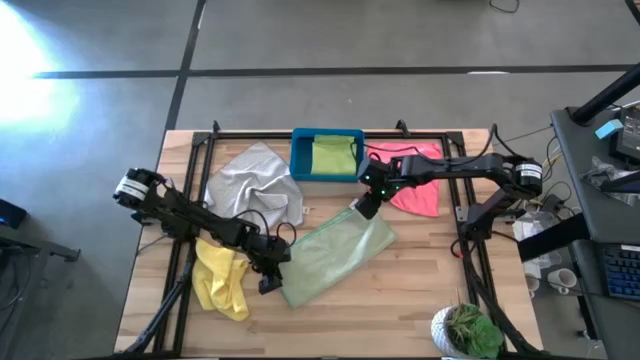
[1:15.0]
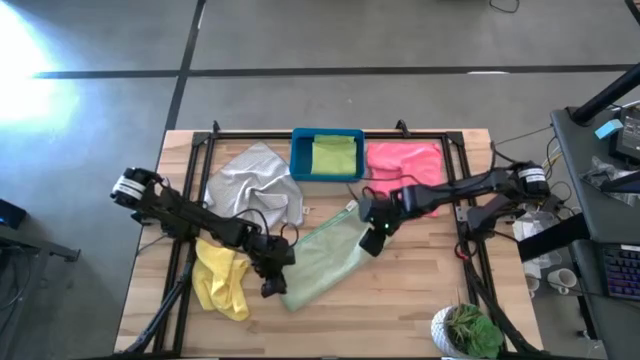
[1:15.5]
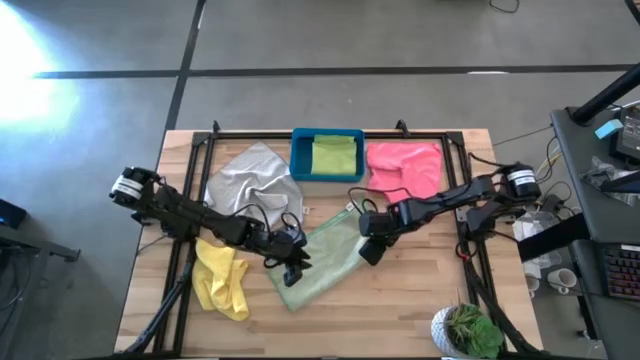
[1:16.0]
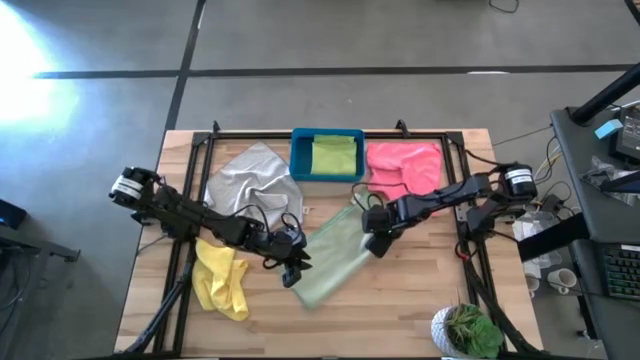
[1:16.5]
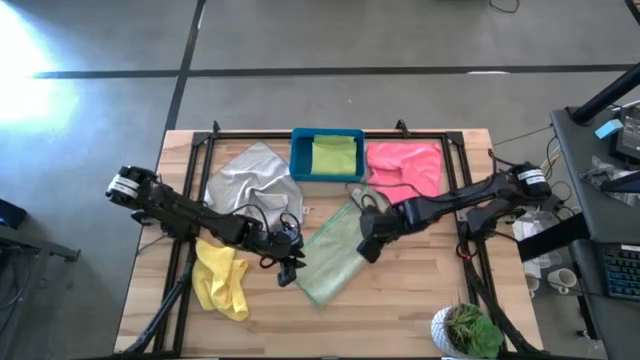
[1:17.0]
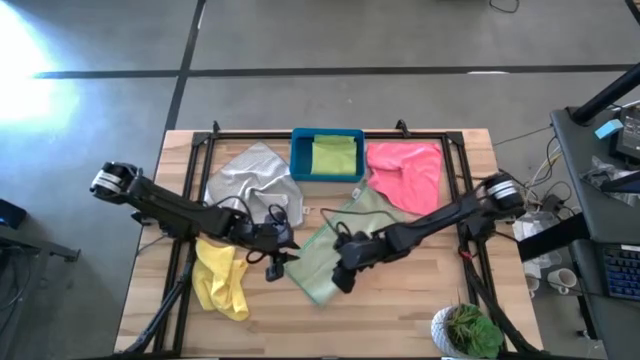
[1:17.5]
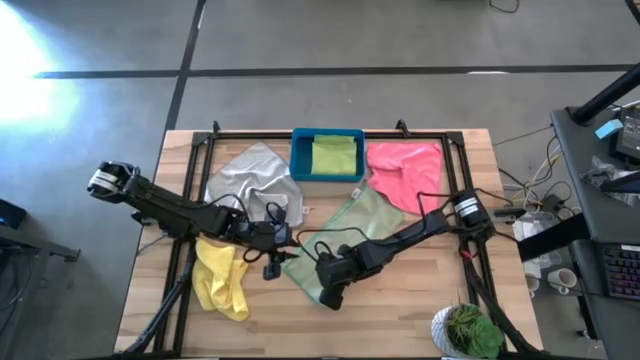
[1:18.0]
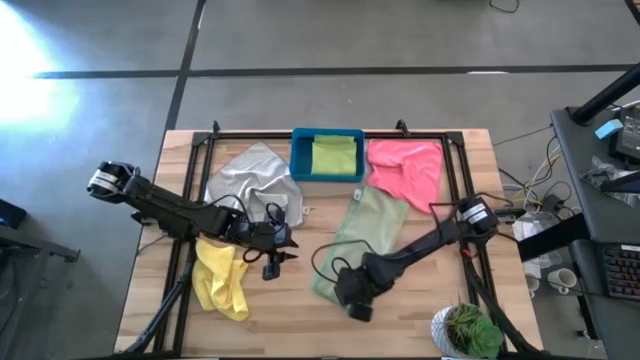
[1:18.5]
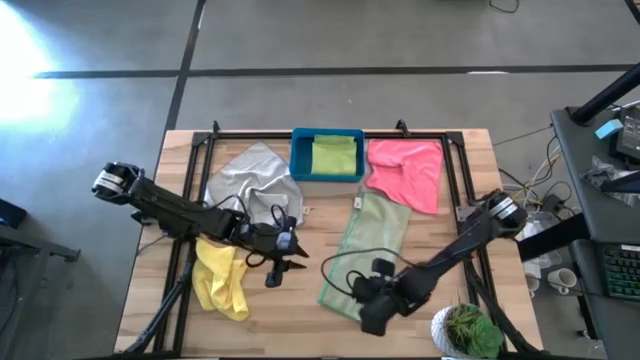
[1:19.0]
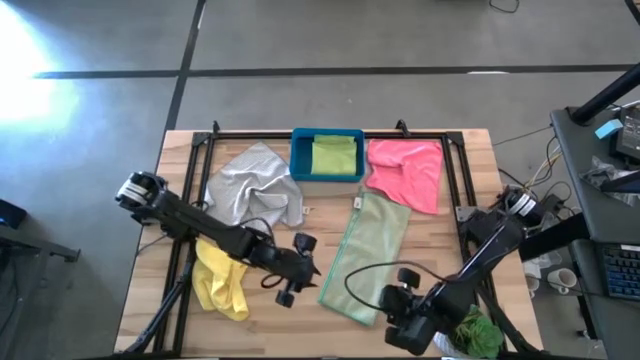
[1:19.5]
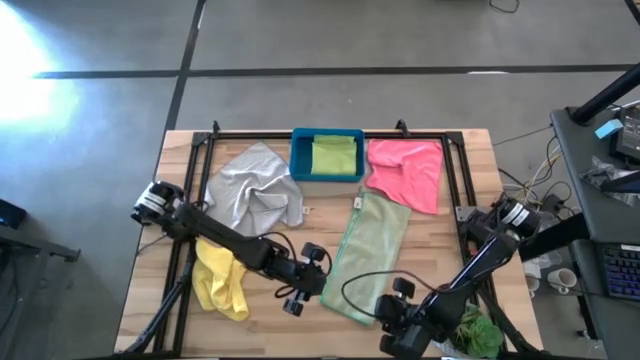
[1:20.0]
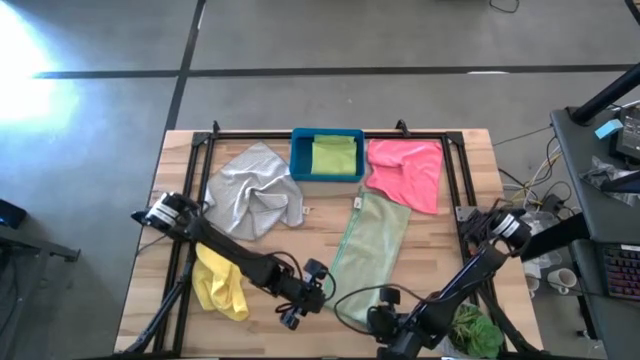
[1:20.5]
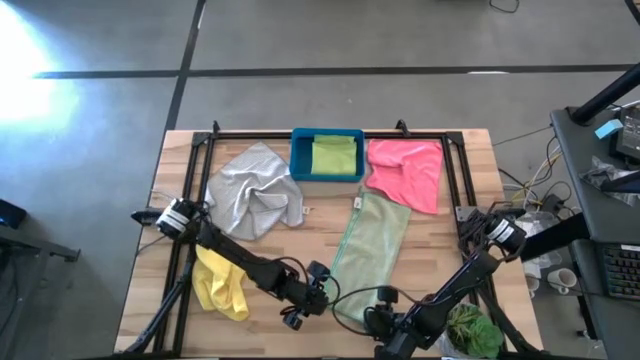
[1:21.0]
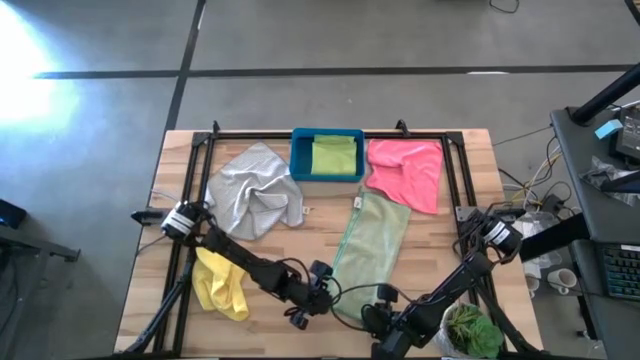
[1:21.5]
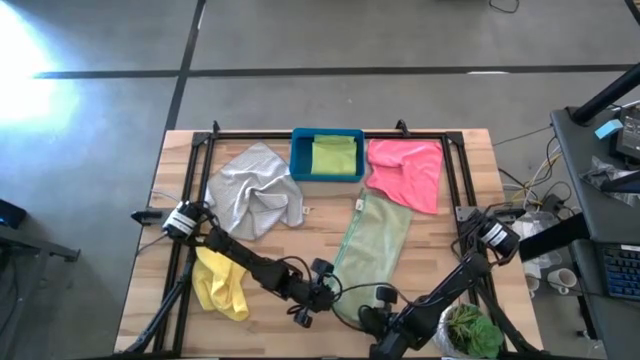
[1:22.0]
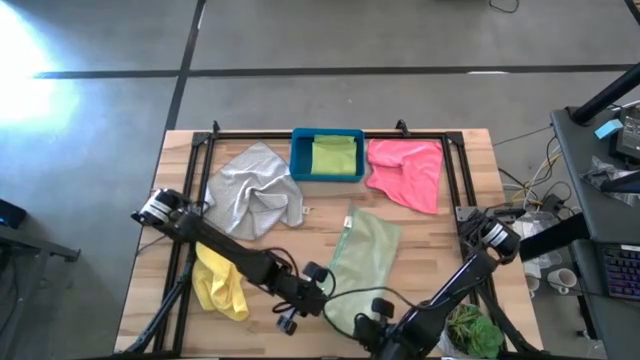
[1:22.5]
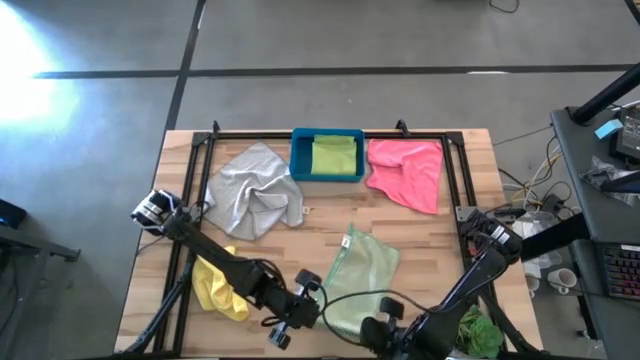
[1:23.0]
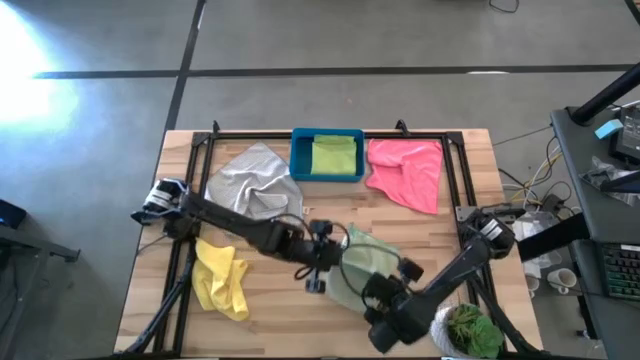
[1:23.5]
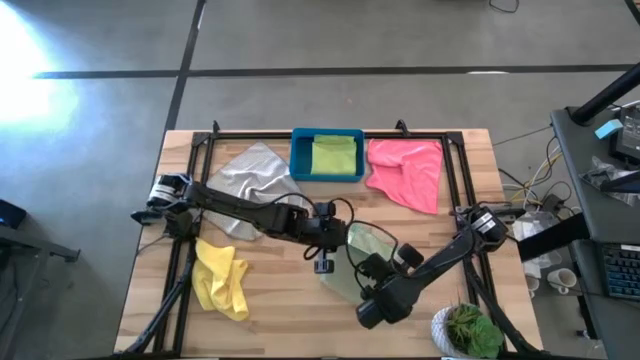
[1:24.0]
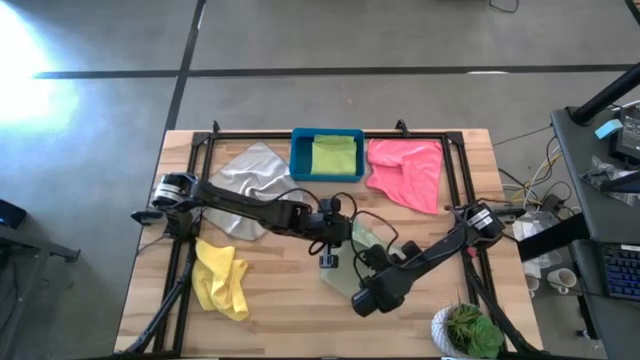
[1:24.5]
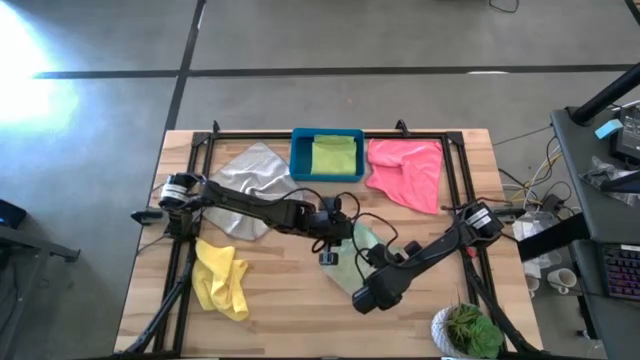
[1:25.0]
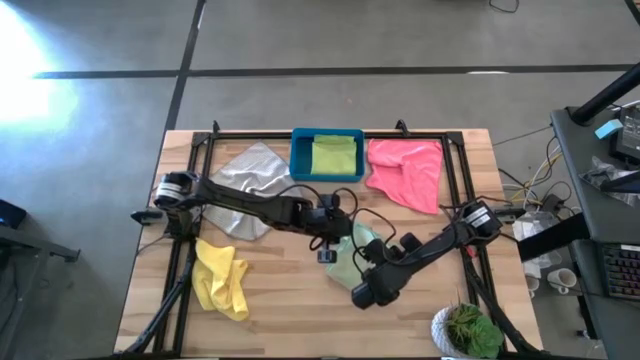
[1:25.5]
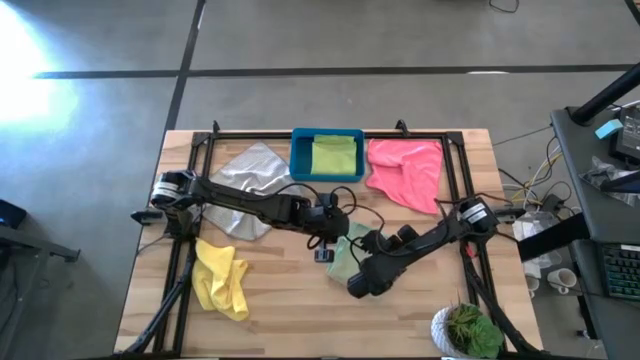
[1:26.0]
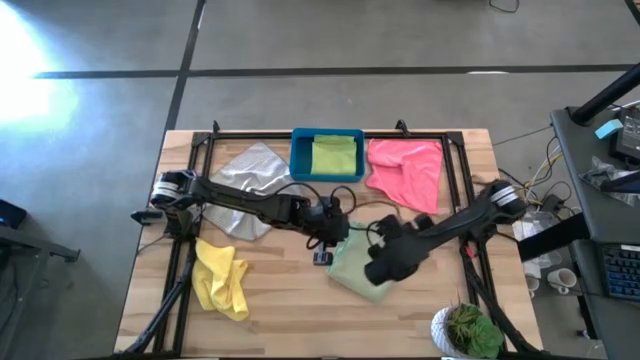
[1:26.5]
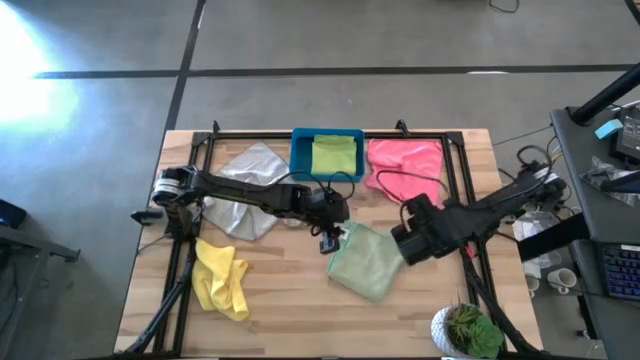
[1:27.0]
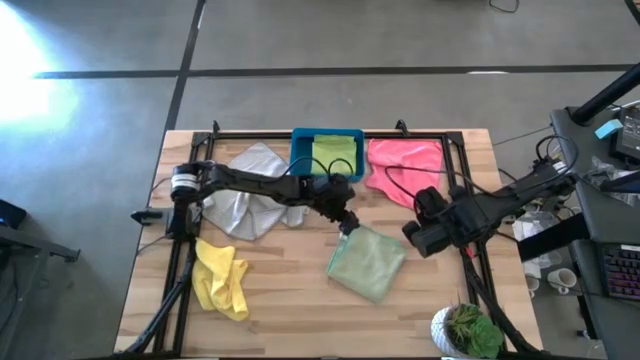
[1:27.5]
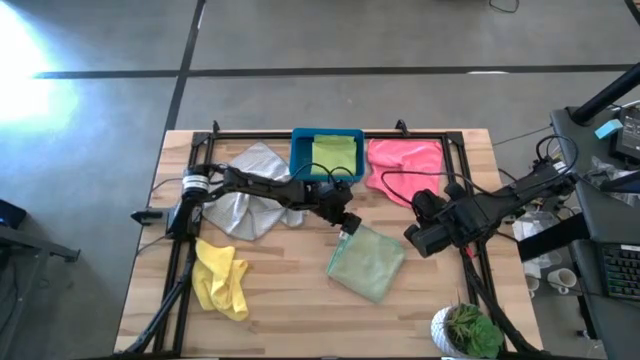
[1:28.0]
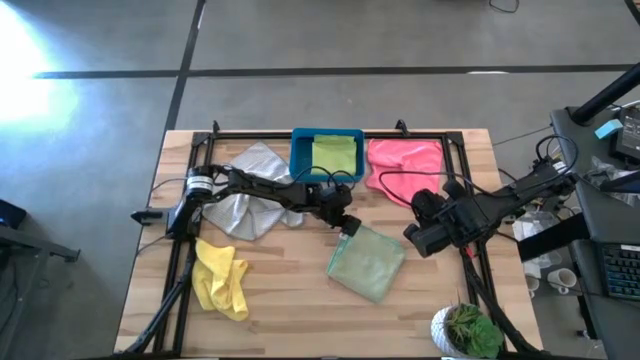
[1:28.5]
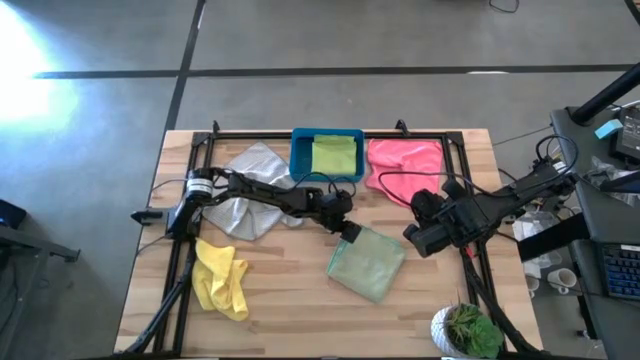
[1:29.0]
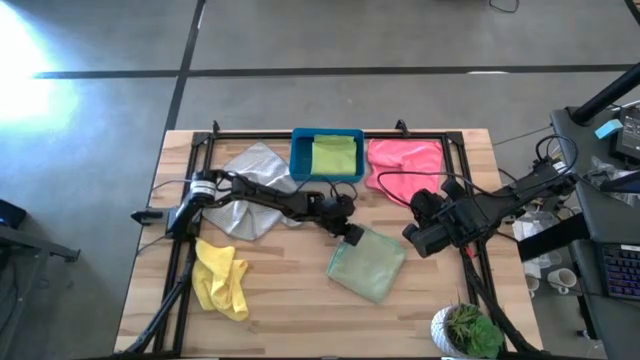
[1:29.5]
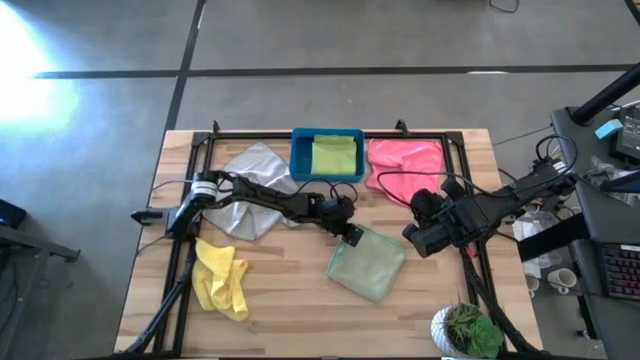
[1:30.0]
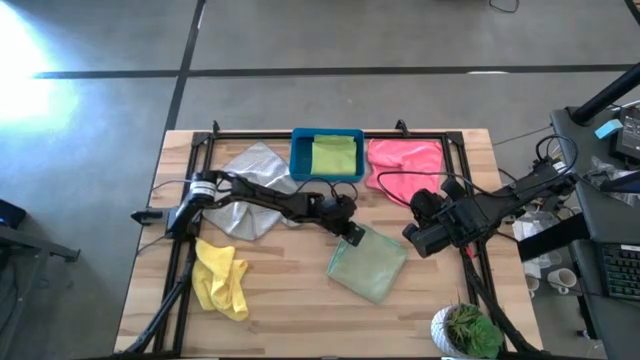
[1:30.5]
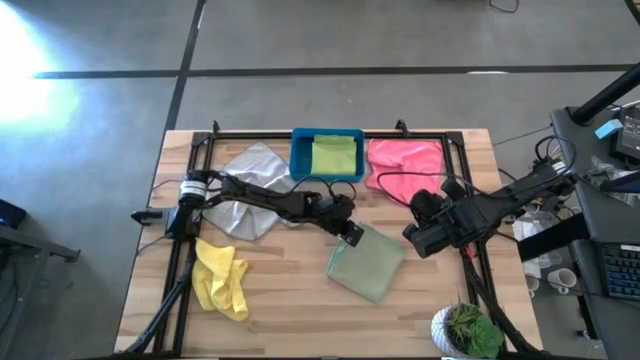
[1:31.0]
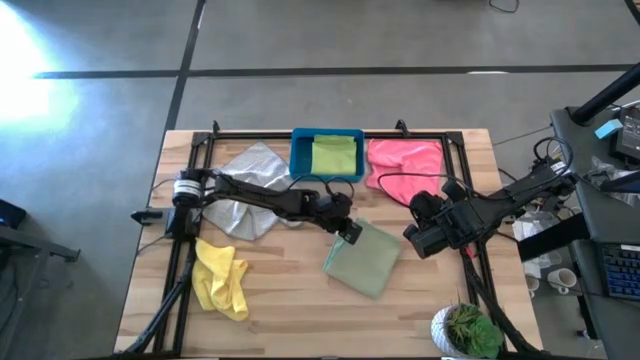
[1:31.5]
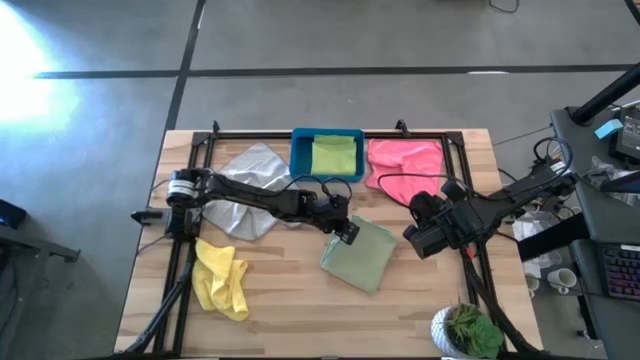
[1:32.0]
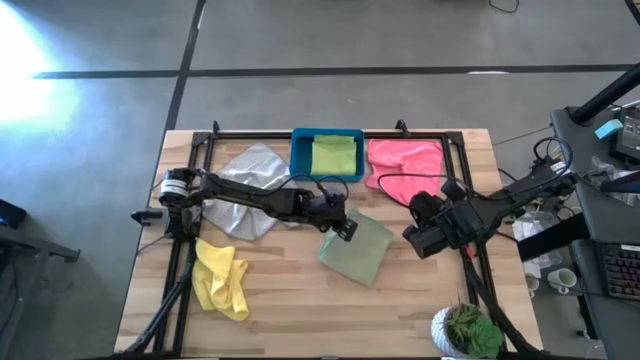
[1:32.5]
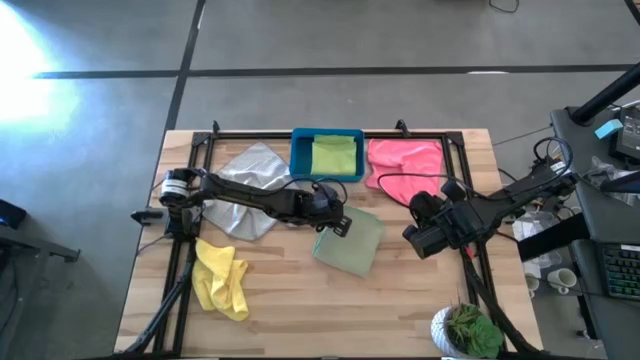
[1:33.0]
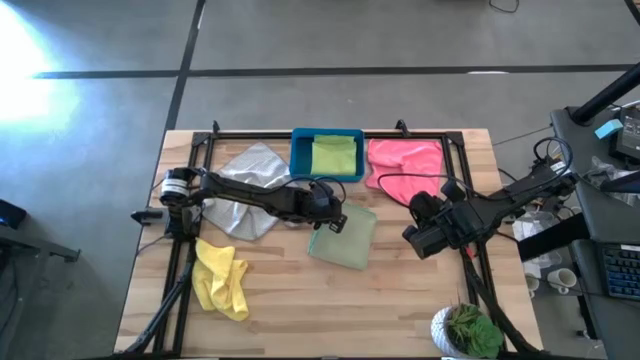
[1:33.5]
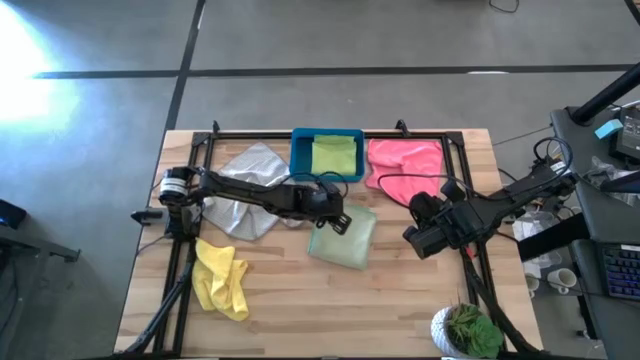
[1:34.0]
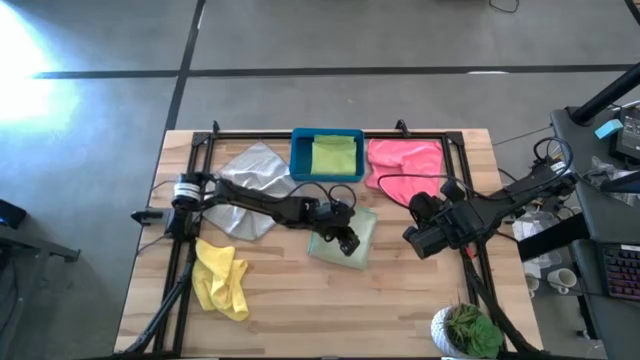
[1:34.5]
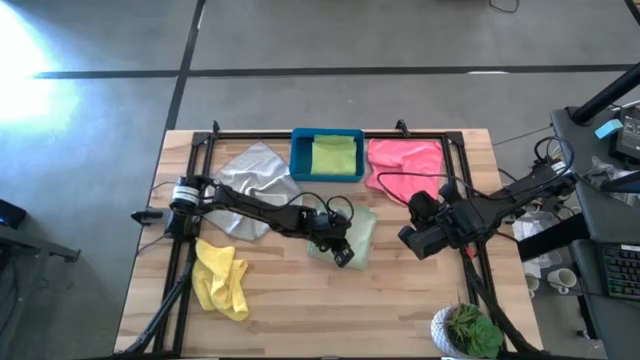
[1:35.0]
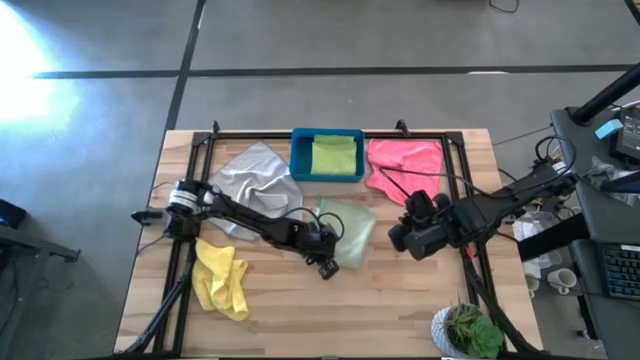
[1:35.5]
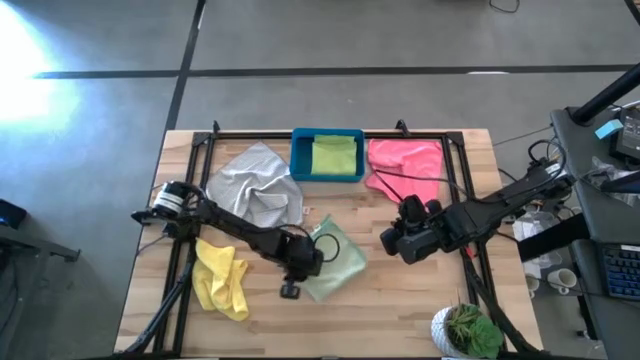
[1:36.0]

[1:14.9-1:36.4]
Task: Fold microfiber towels
Fold the green microfiber cloth
